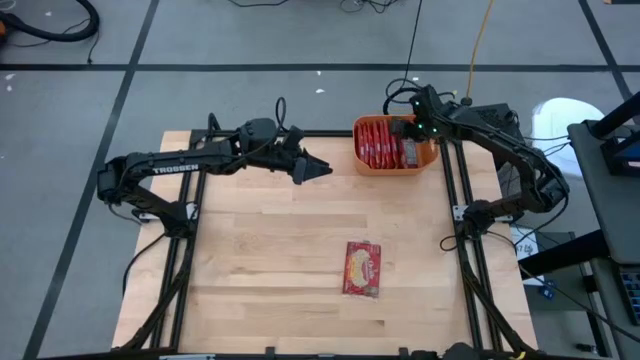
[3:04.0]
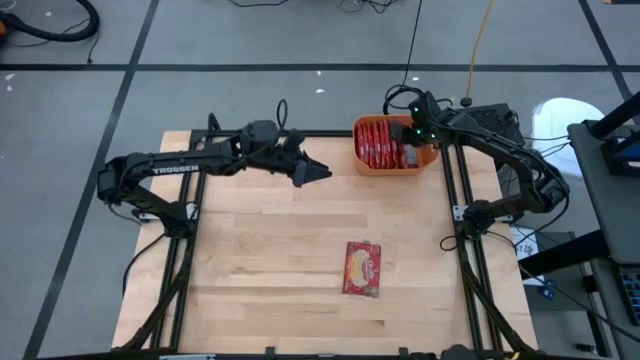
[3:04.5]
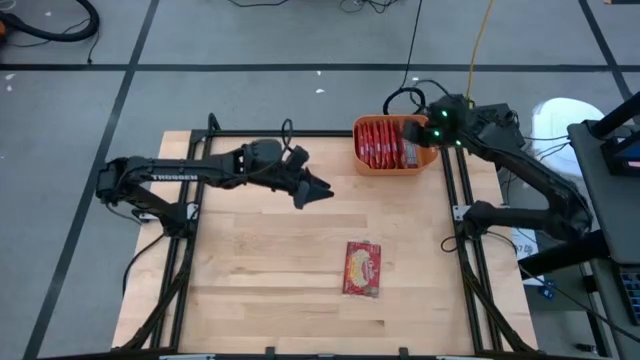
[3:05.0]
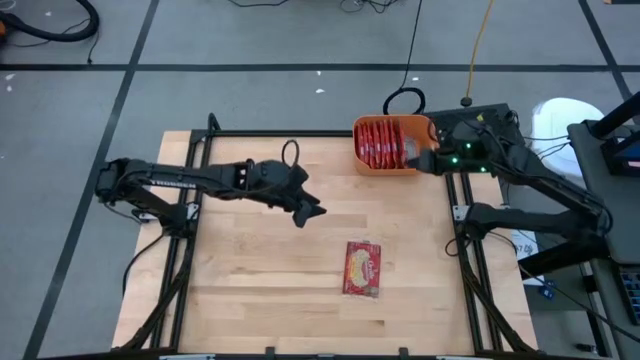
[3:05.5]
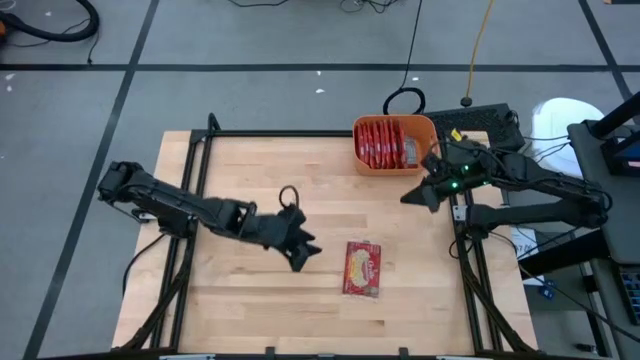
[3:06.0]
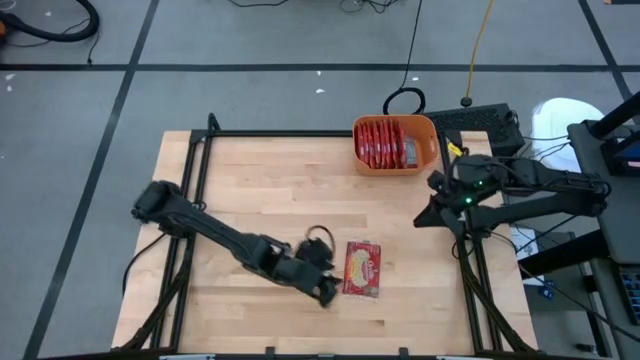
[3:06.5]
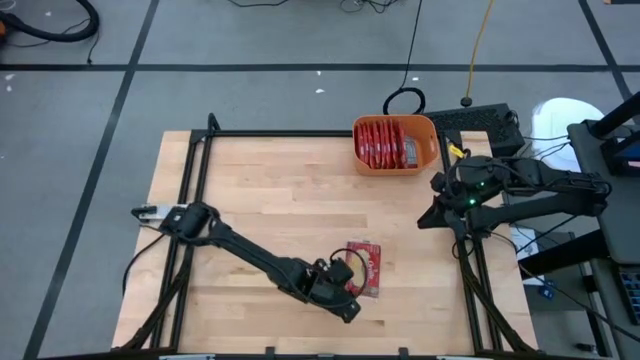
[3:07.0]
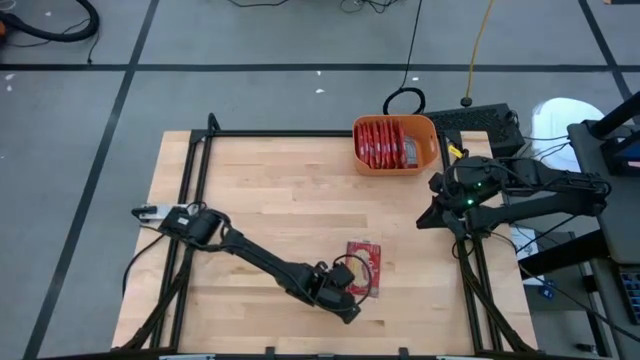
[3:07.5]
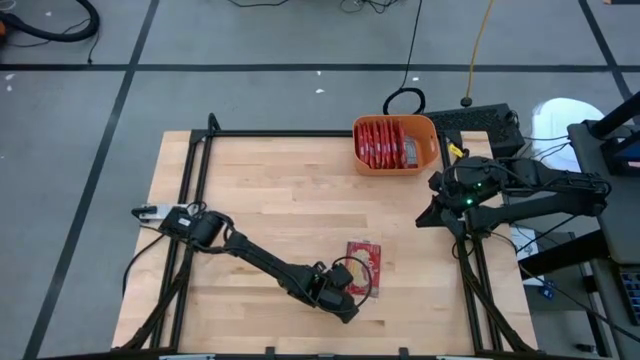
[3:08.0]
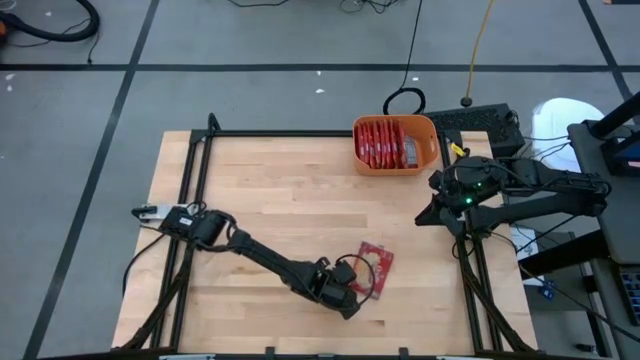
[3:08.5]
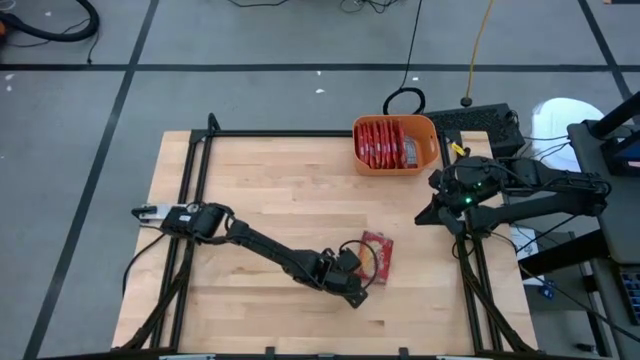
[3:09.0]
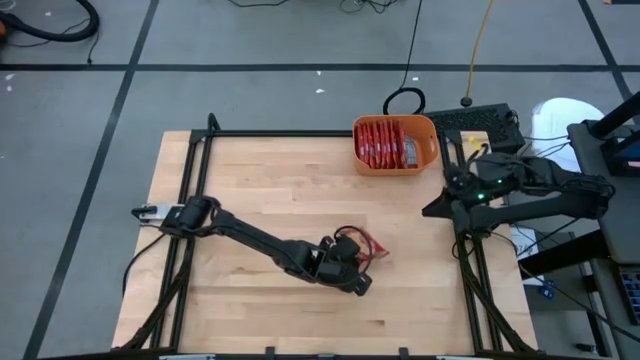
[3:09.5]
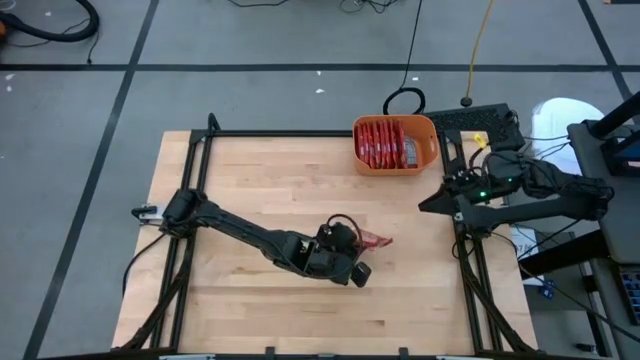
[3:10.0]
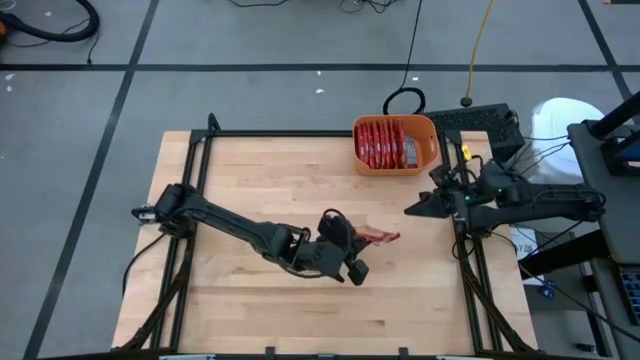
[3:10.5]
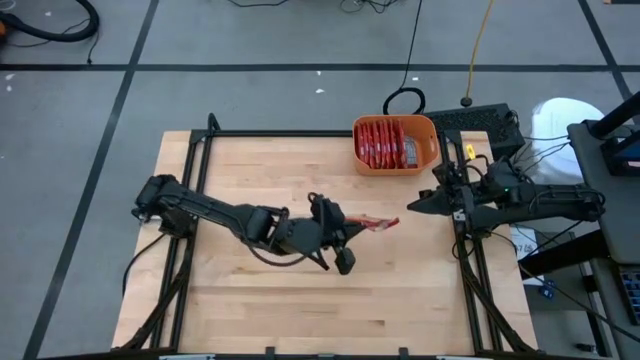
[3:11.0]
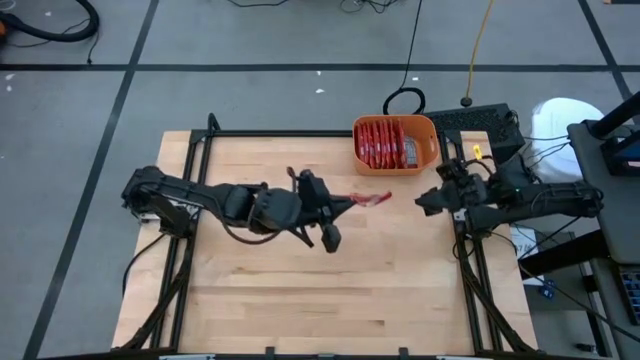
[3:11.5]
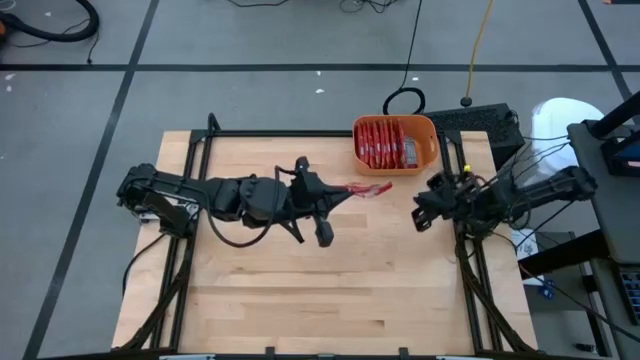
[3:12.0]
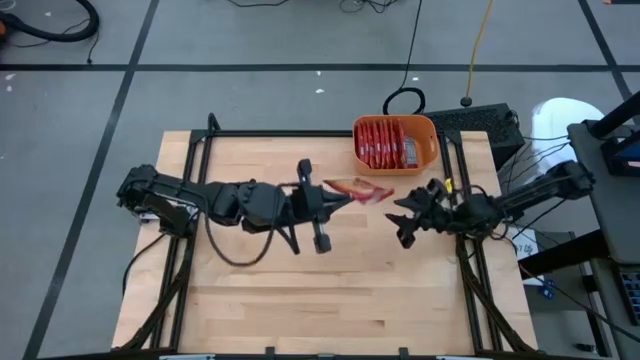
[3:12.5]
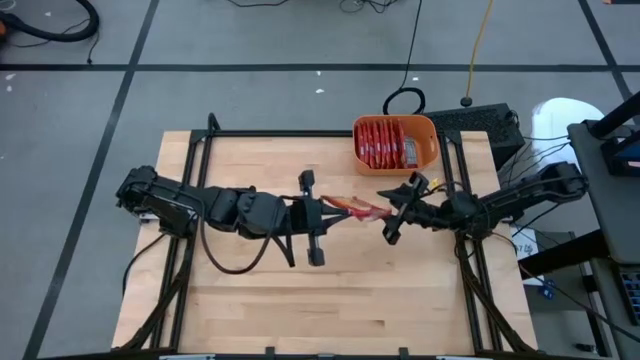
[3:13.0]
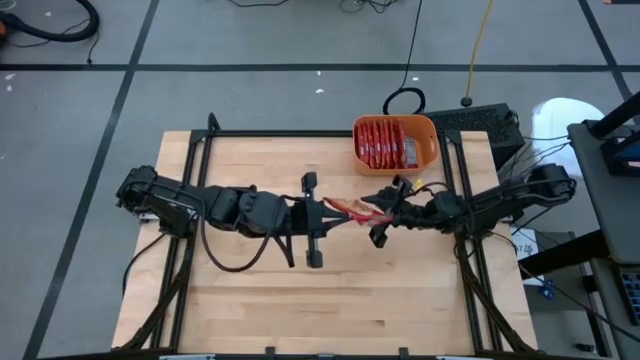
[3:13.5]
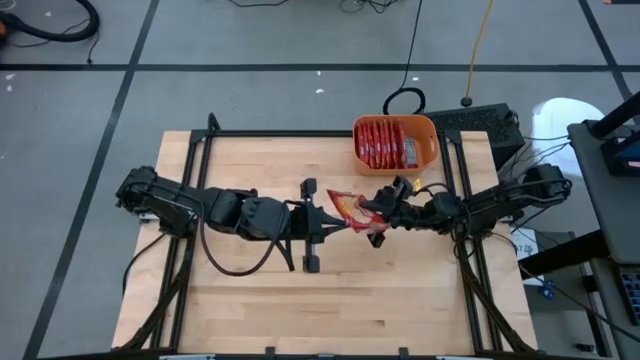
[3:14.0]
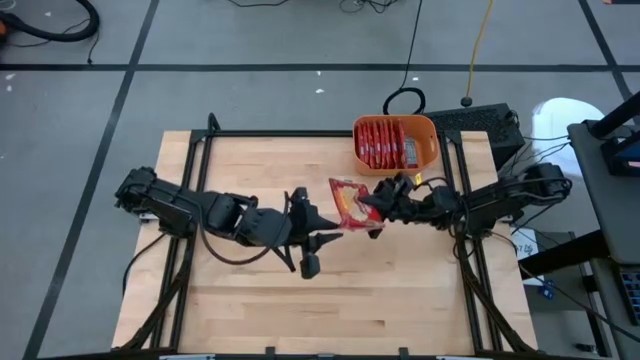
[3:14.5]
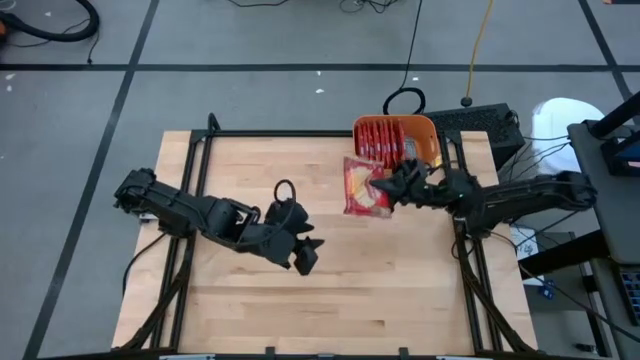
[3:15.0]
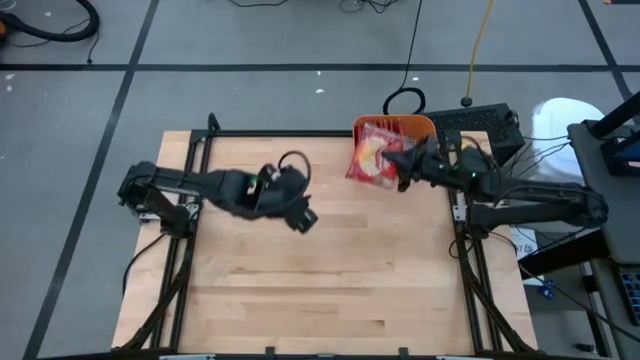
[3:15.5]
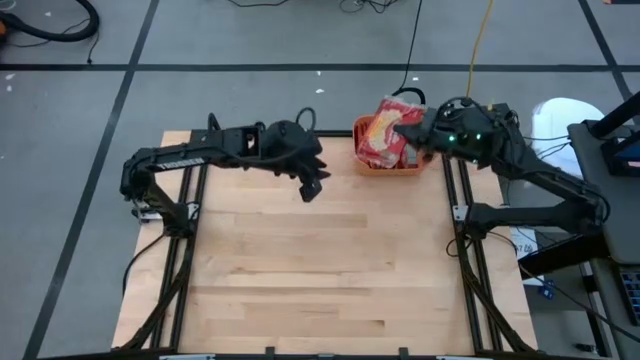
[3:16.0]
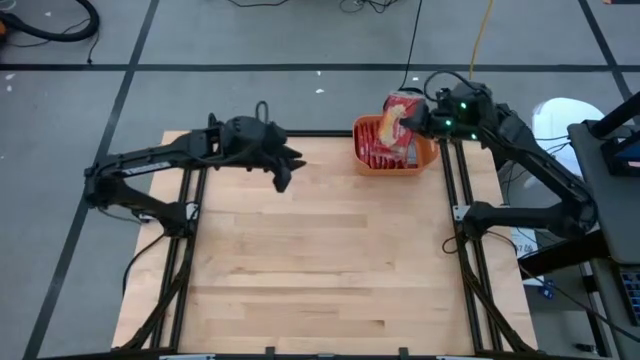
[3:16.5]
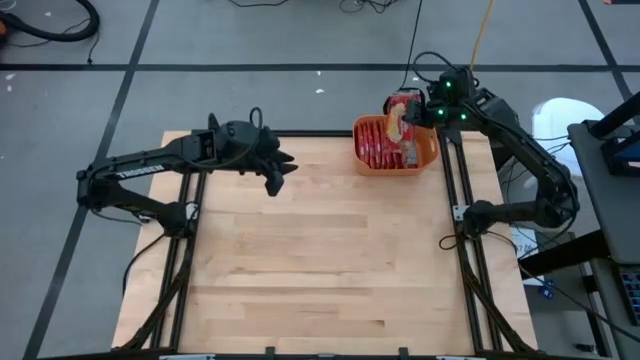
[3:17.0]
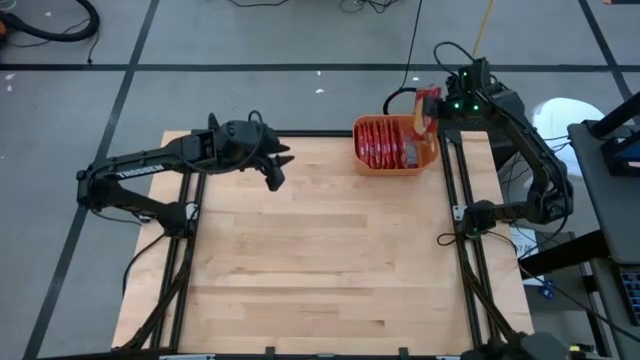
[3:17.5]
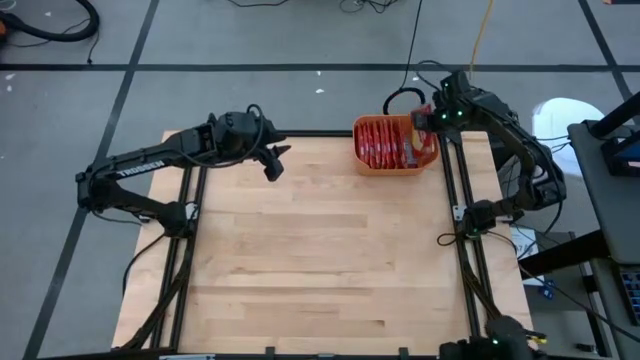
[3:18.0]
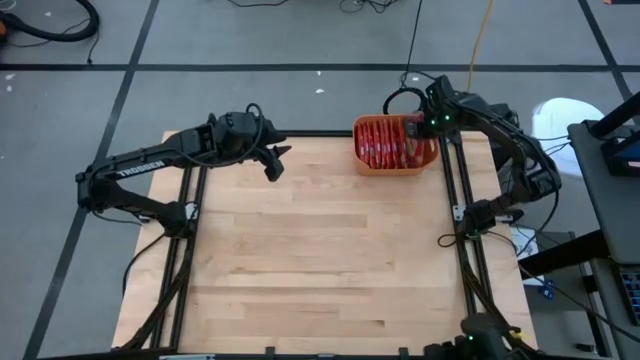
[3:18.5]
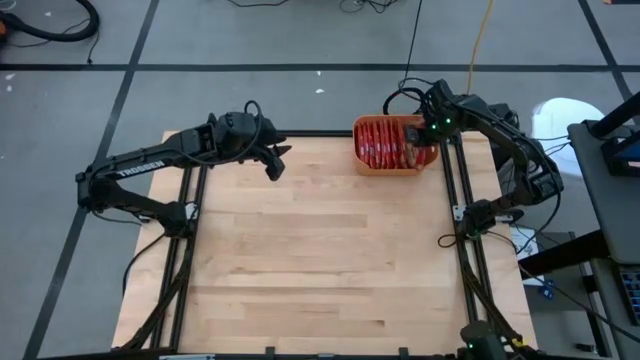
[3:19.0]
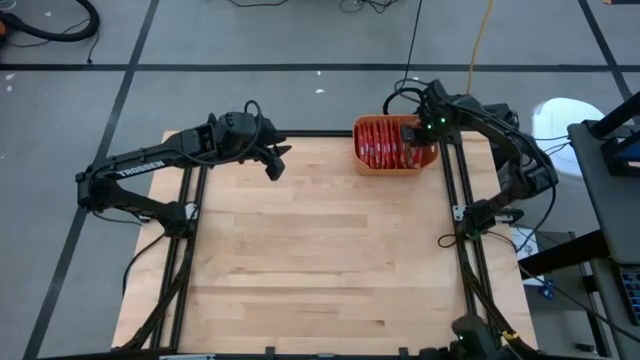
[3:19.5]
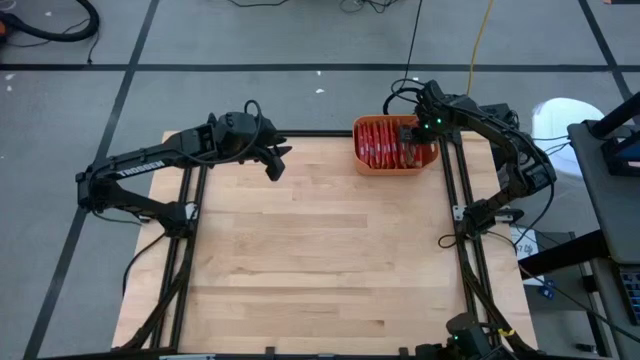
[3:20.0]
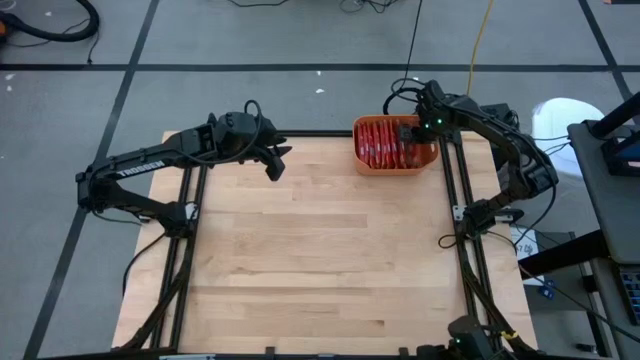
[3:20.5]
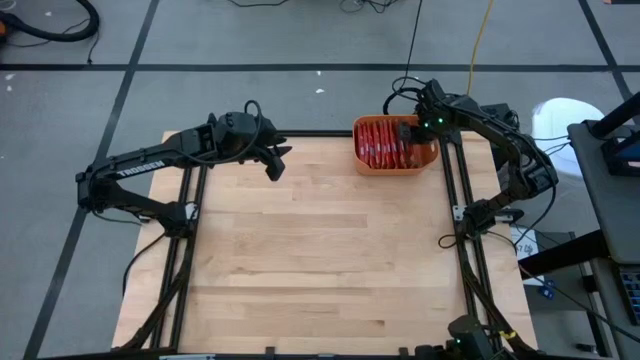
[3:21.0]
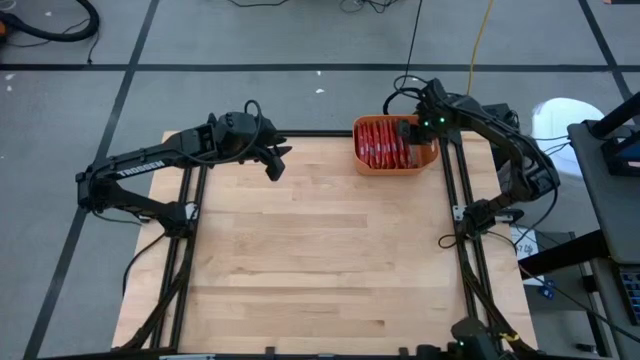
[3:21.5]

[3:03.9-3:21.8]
Task: Sort popcorn bags into baskets
Put the red popcorn bag into the orange bin

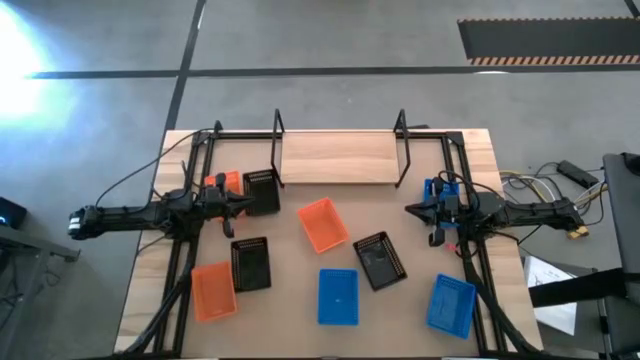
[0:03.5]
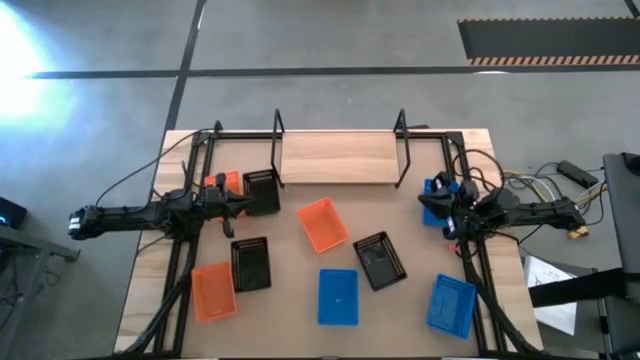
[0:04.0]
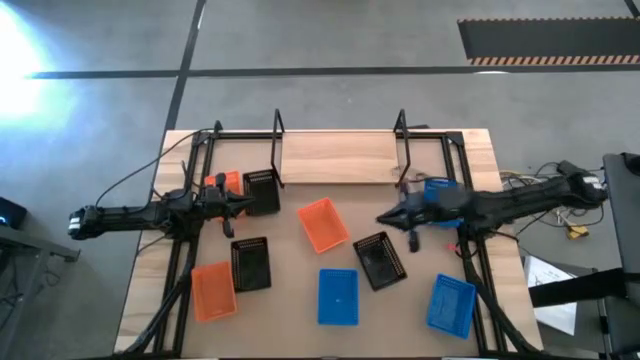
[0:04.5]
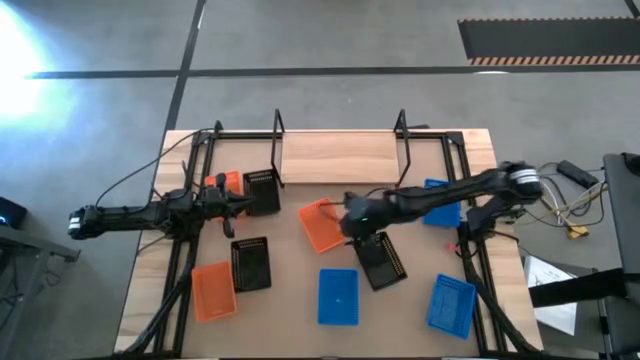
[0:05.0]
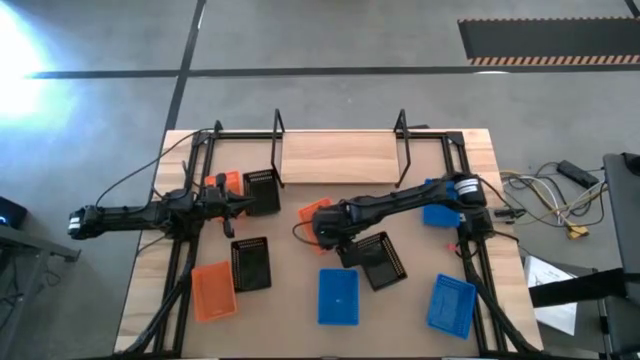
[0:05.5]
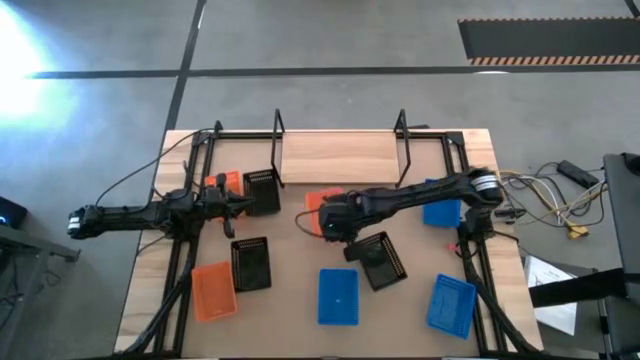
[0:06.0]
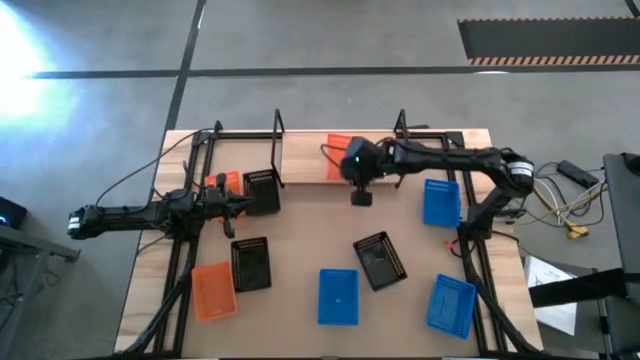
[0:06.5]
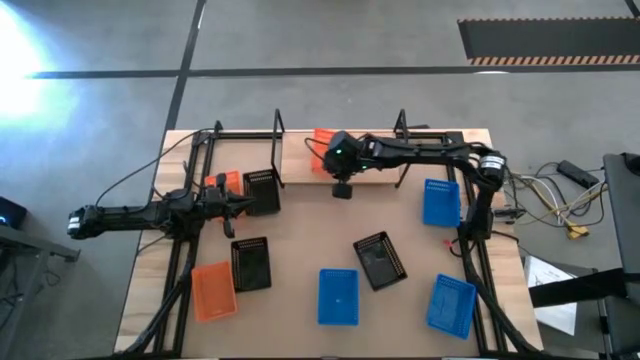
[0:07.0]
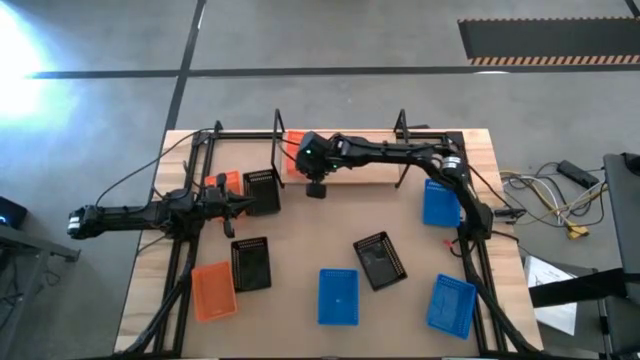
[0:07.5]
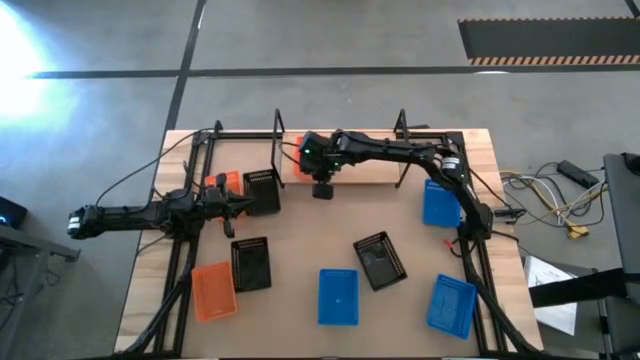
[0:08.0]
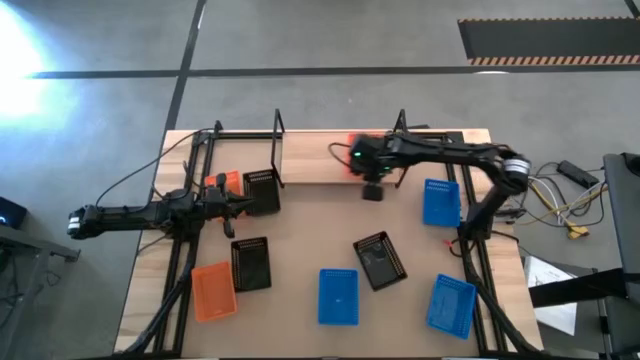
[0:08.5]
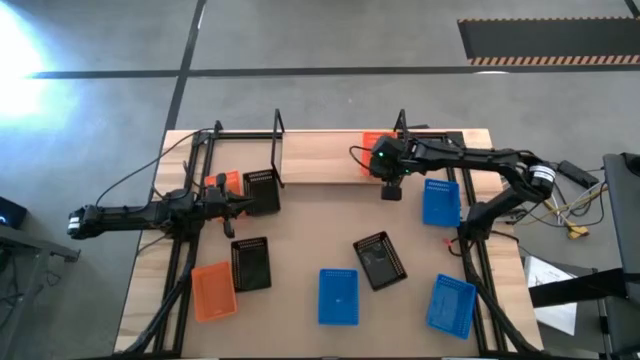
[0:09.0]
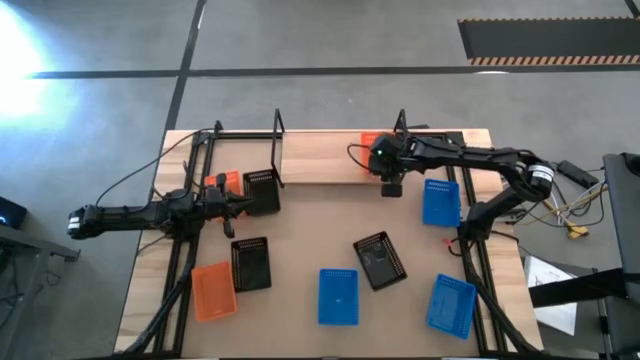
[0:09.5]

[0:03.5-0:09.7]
Task: Stack baskets on shelf by color
Put the middle orange bin on the shelf
